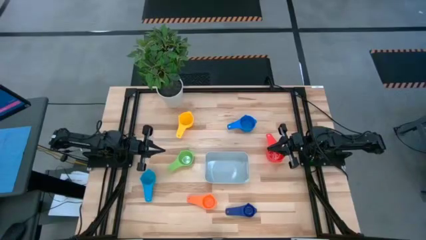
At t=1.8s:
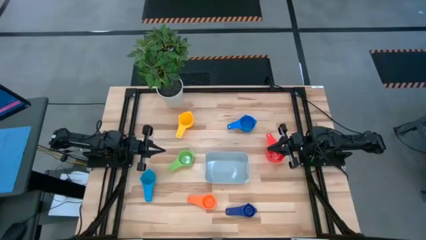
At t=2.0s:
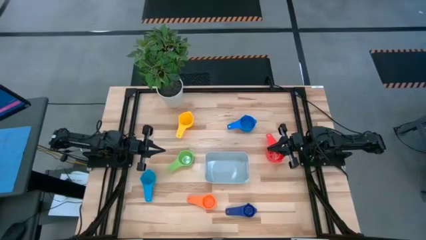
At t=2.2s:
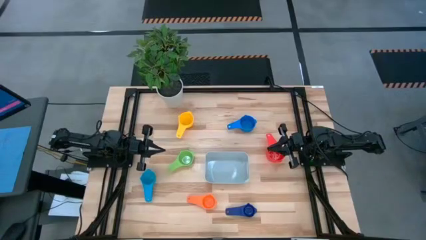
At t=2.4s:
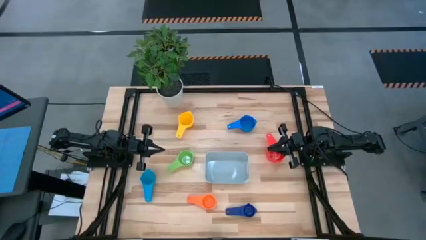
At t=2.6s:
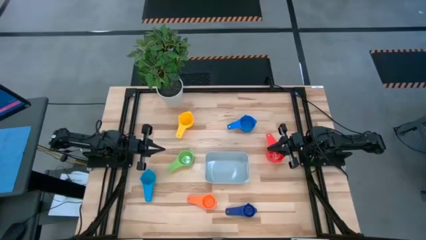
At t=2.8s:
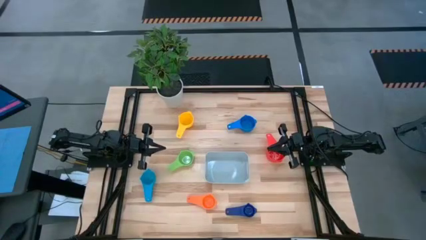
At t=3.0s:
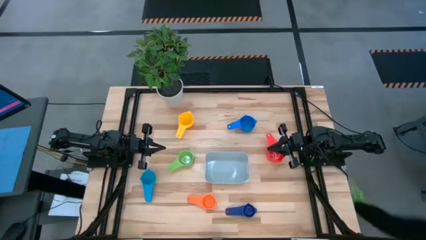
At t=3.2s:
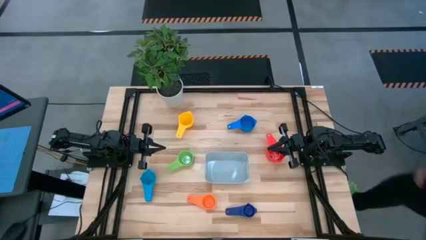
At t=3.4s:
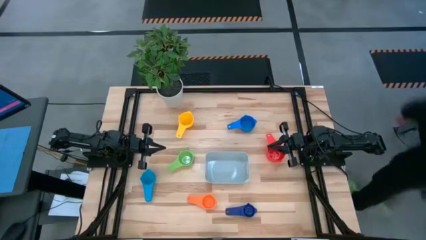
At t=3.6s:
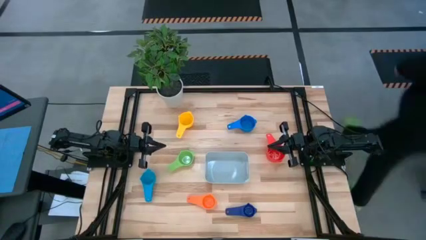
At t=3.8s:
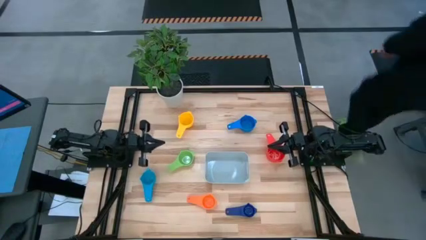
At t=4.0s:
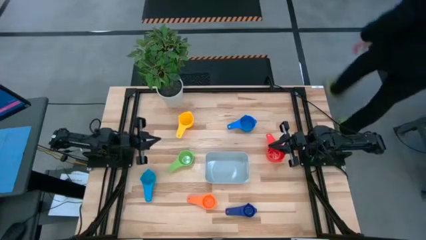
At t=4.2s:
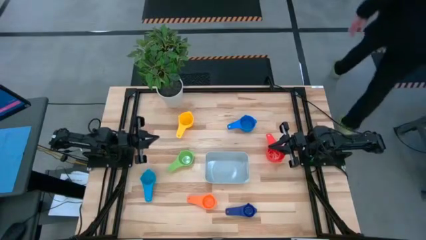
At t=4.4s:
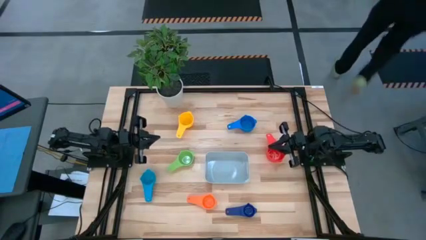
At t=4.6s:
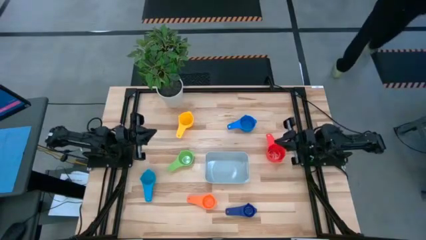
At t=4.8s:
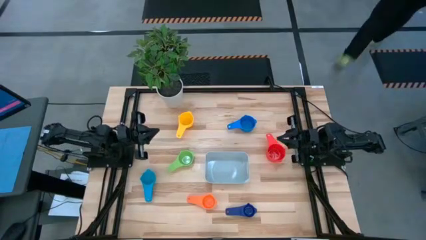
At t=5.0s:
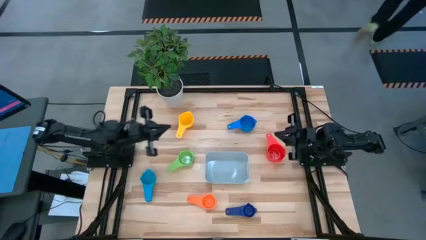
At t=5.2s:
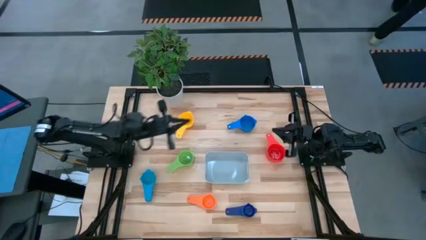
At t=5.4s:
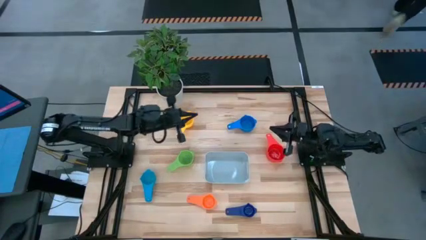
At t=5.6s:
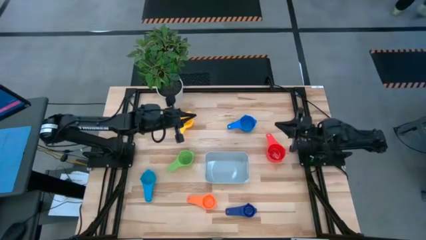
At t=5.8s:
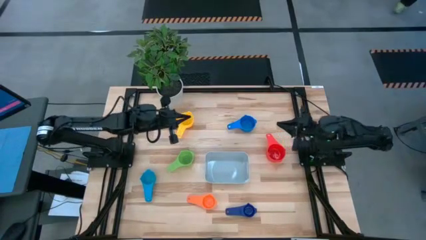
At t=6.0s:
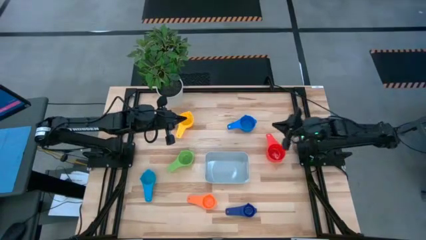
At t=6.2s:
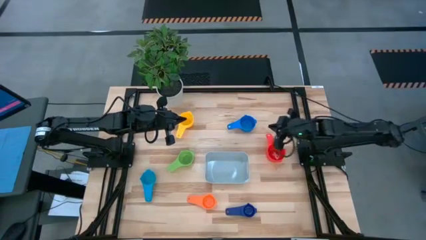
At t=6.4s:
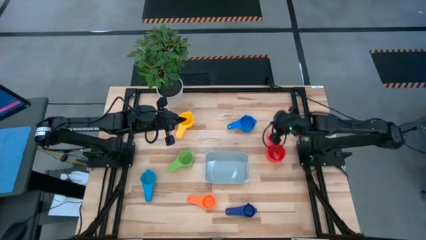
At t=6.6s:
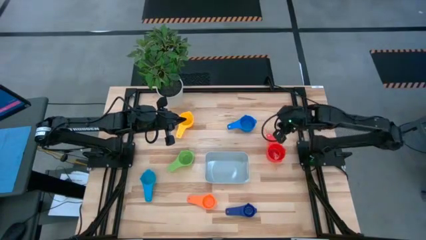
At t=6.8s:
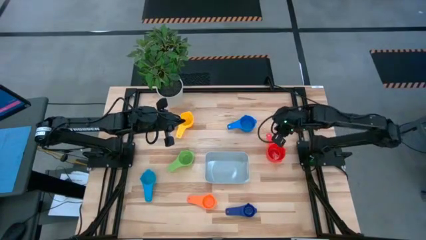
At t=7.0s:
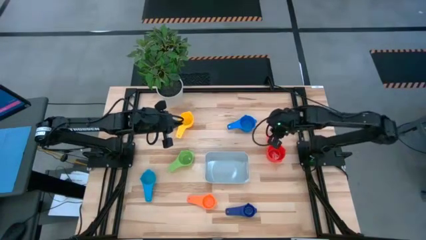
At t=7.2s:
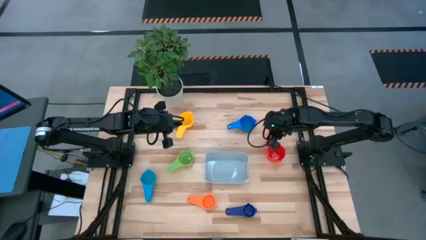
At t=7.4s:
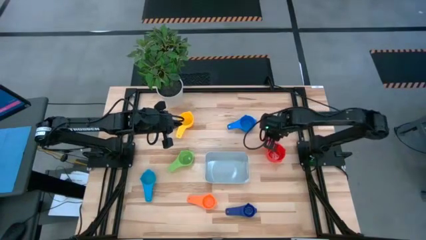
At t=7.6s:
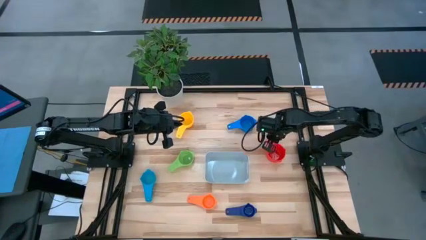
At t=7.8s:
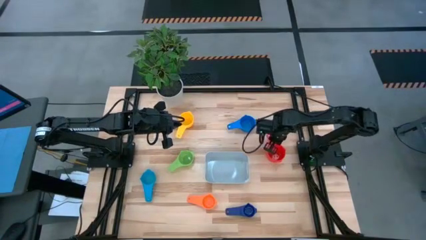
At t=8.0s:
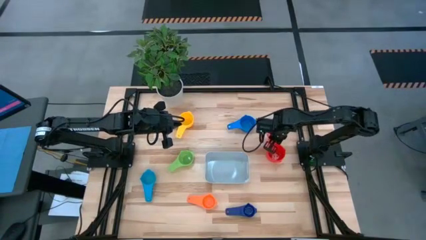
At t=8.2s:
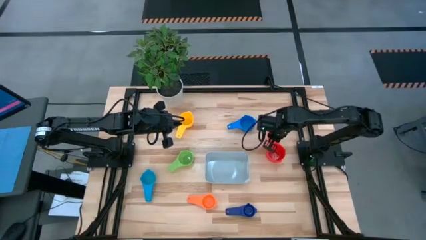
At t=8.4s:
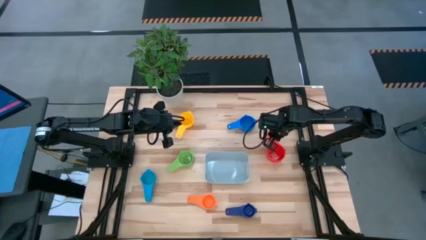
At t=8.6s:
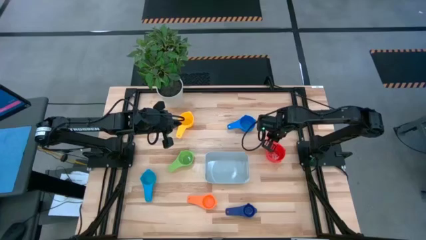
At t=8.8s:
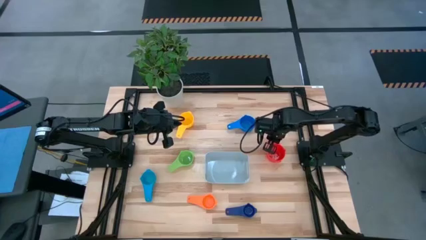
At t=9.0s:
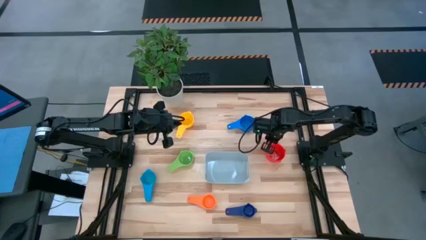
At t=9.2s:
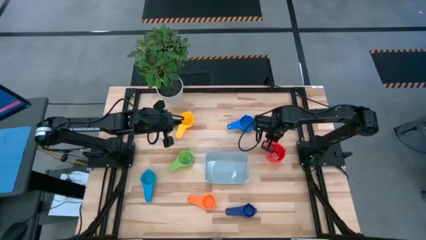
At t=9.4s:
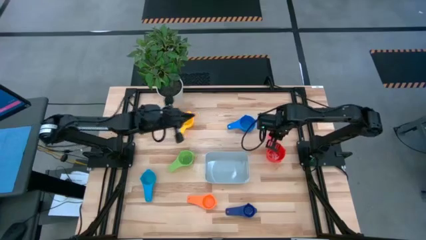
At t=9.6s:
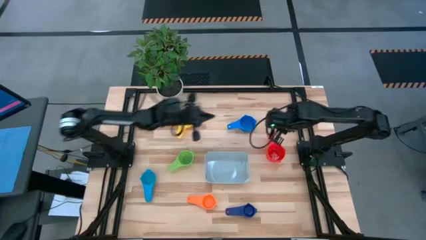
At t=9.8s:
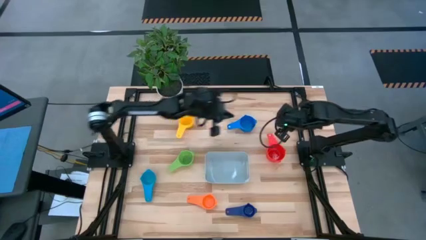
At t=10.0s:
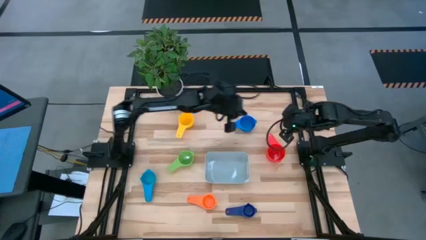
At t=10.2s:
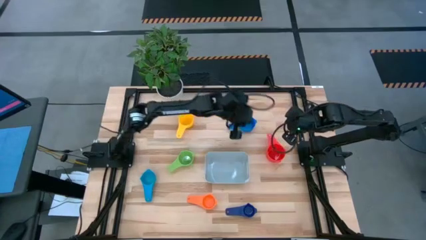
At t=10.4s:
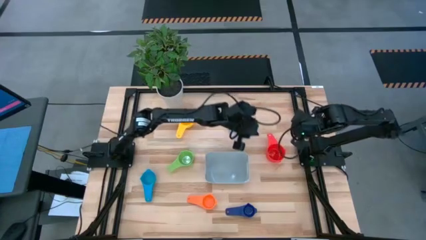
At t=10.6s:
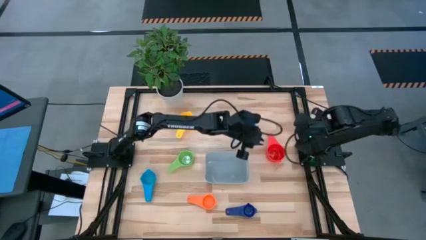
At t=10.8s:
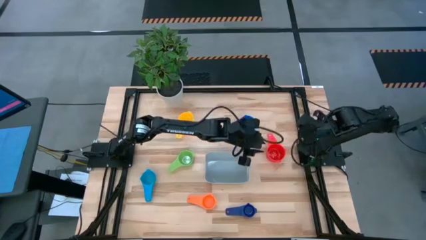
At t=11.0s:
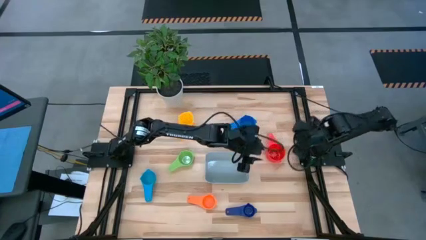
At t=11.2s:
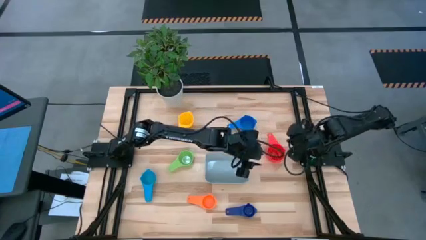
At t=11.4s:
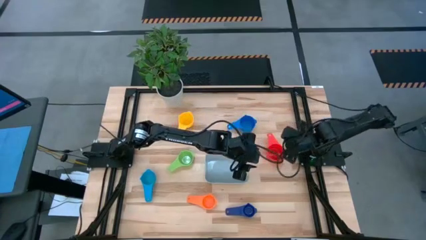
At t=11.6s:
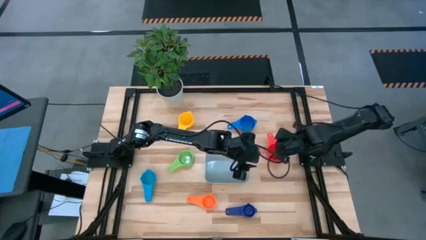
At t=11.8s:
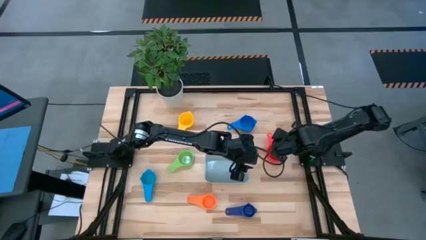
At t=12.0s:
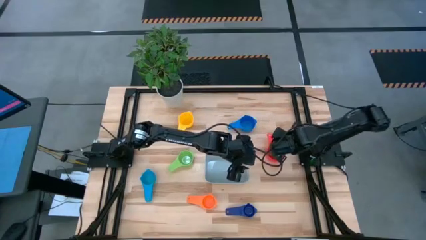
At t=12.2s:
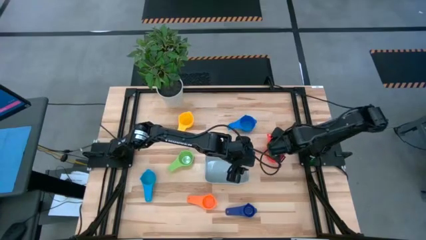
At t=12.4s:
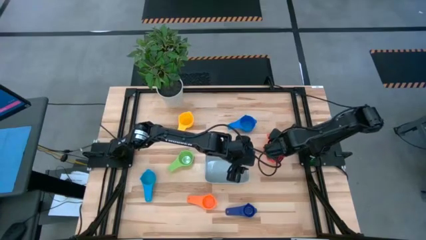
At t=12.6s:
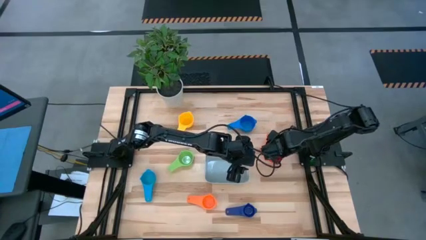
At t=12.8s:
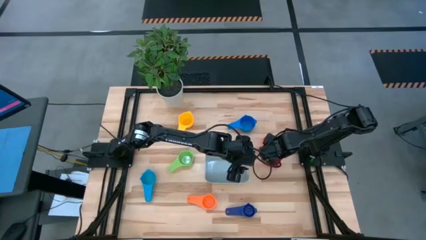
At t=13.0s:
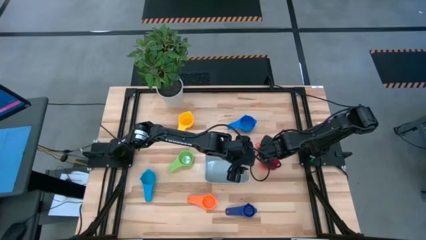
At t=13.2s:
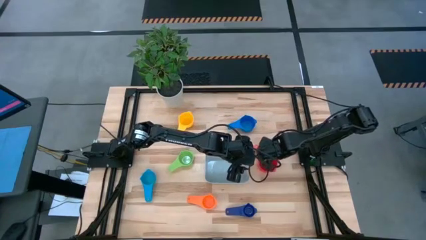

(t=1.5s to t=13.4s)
Task: Nest measuring cups in basket
Adjust the red measuring cup
